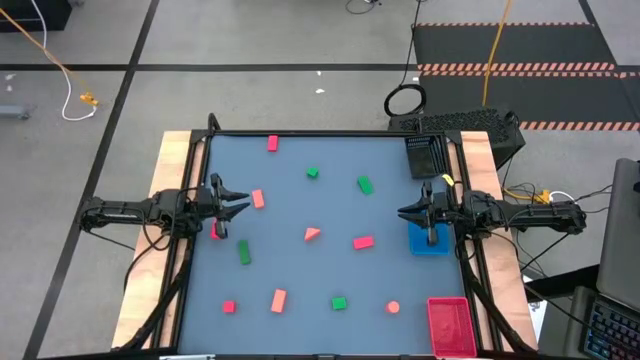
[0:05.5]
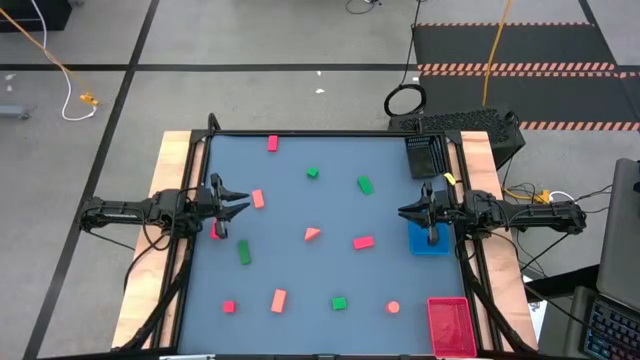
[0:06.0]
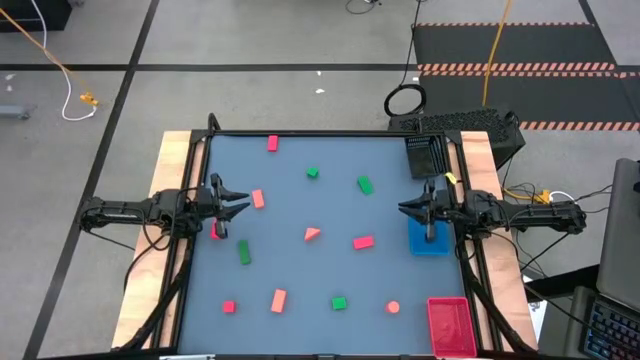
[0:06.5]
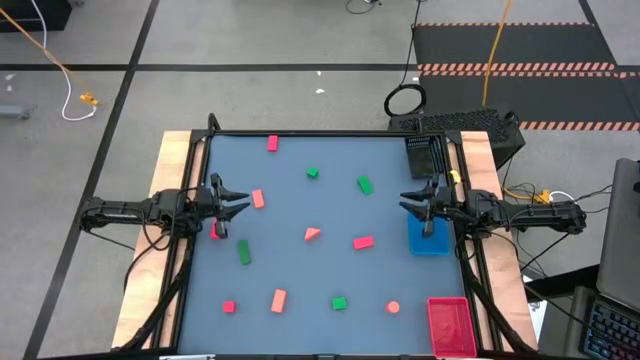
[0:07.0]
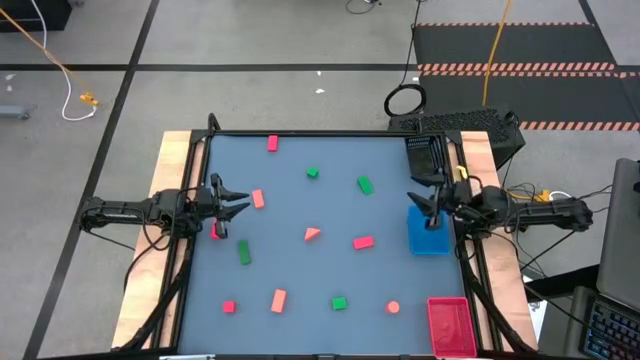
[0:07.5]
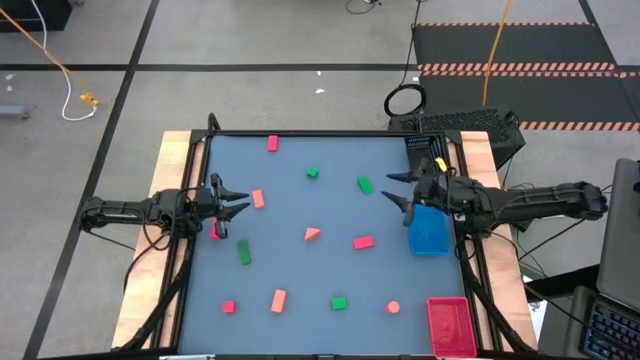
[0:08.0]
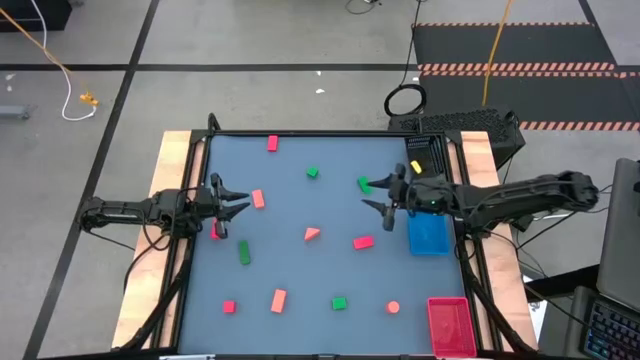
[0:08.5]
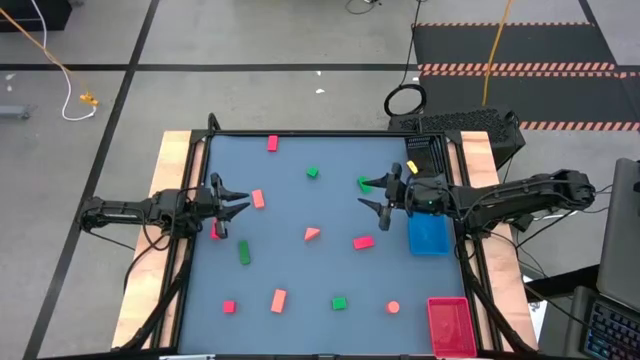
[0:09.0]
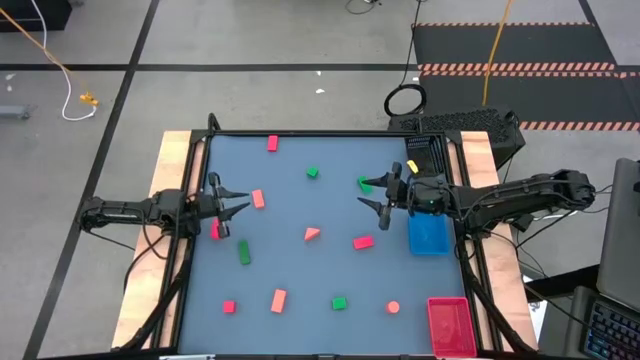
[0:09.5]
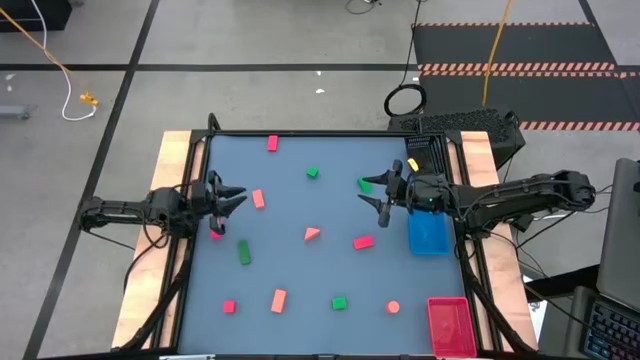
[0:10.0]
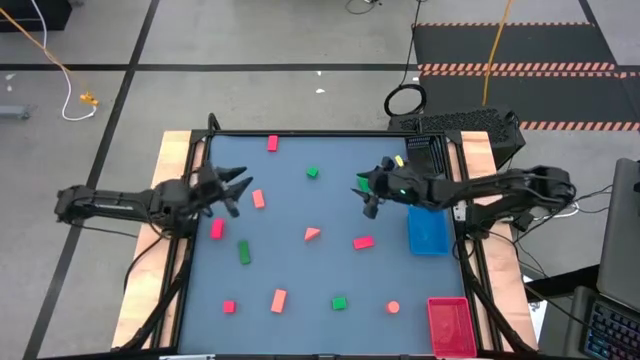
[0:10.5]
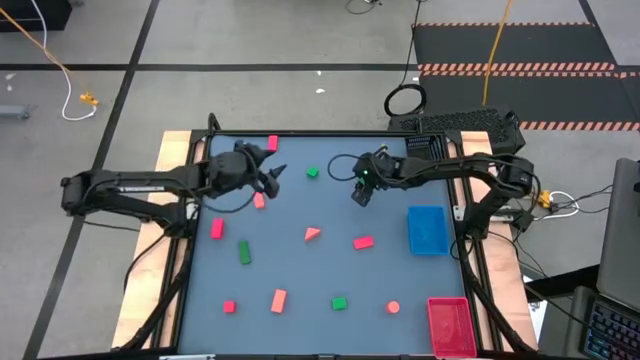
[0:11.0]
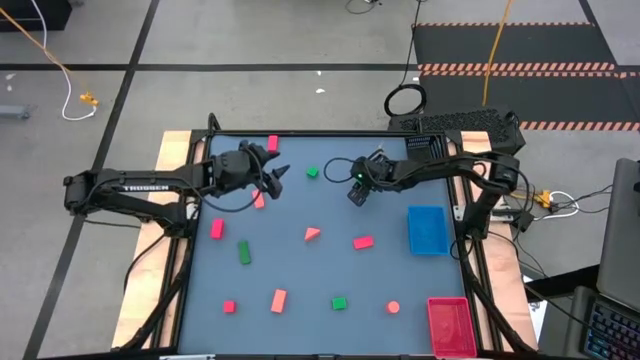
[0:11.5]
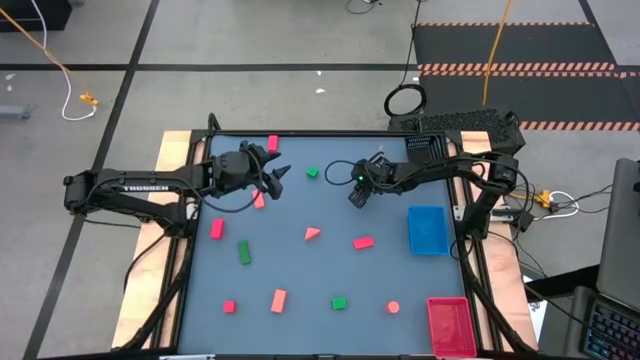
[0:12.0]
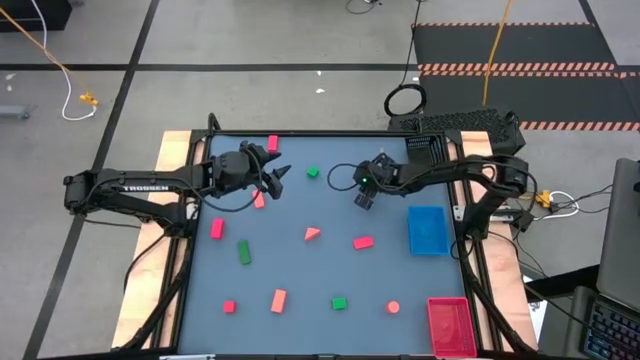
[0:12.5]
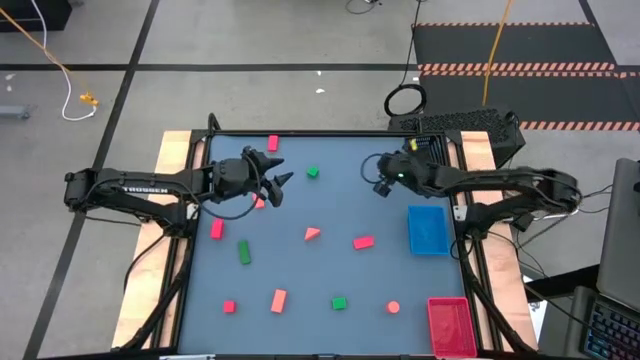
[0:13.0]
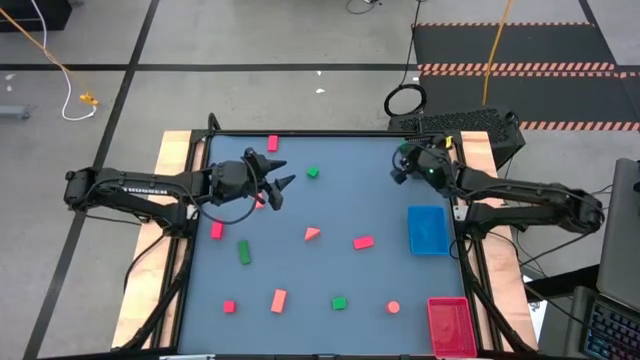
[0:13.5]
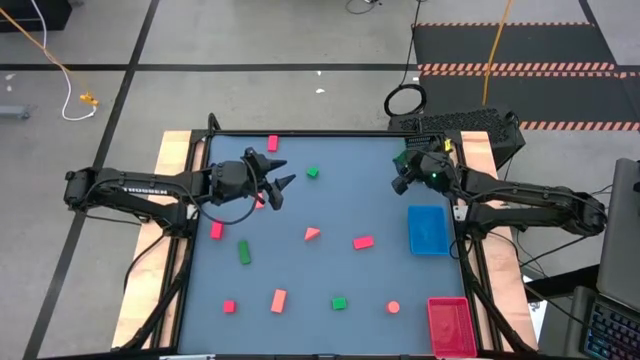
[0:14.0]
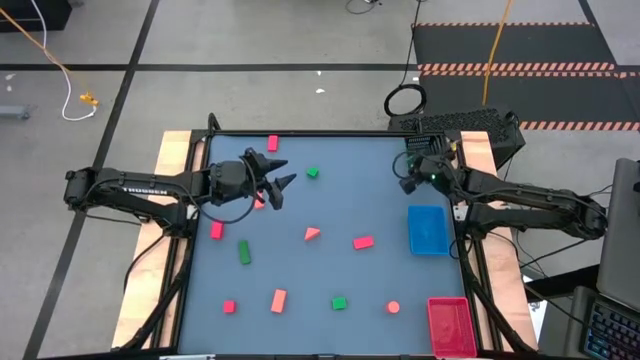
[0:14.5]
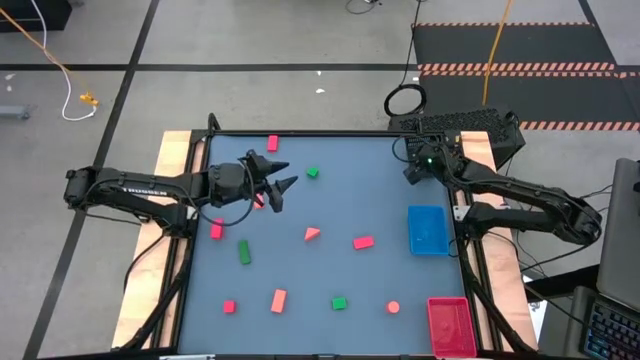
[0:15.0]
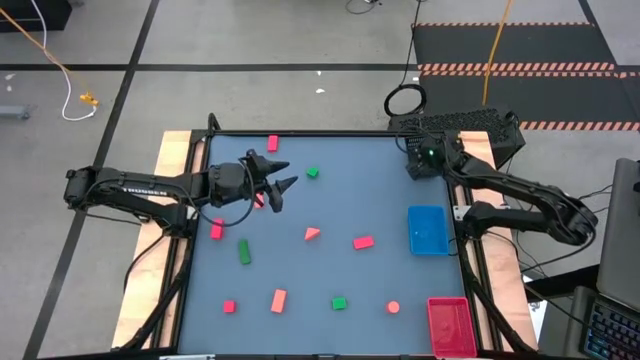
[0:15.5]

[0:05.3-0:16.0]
Task: Sort & place blocks by color
Put the green block into the black bin

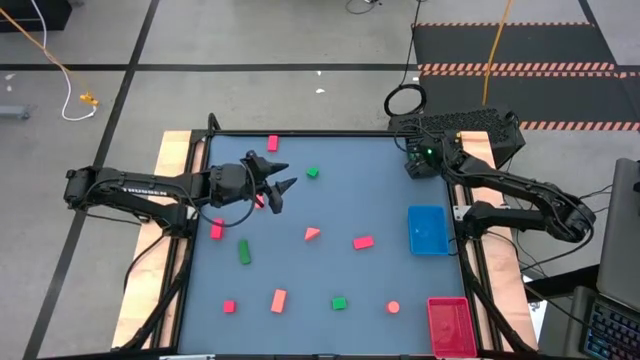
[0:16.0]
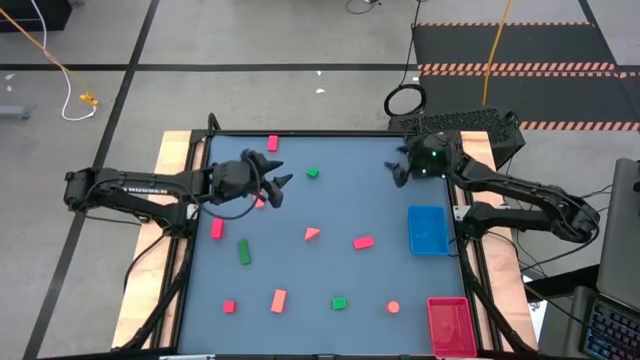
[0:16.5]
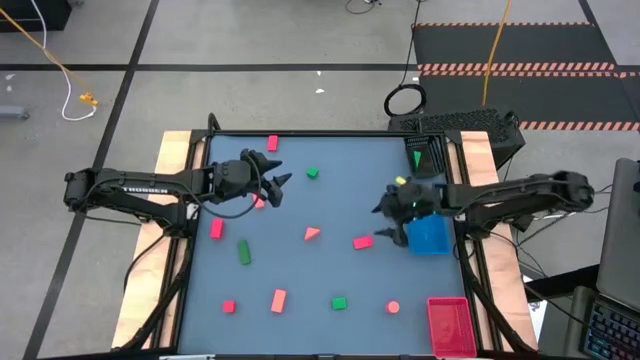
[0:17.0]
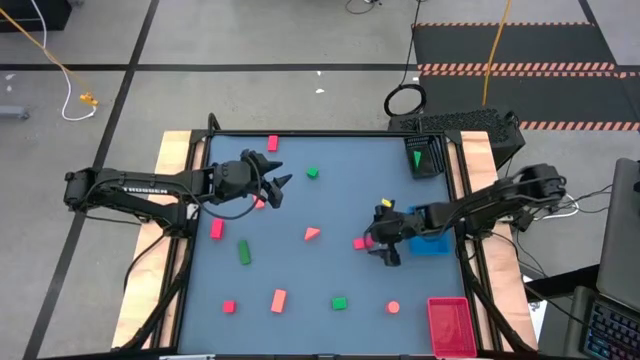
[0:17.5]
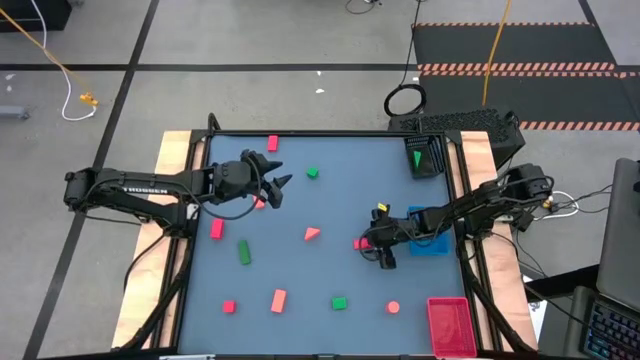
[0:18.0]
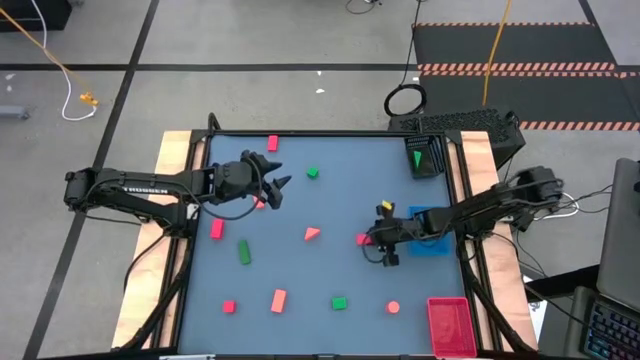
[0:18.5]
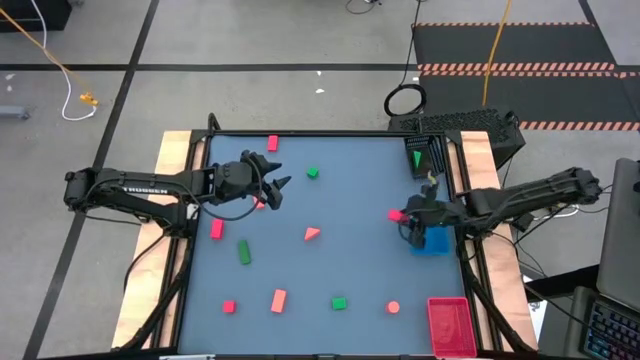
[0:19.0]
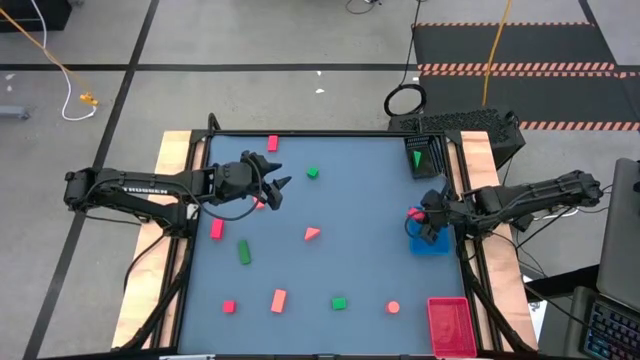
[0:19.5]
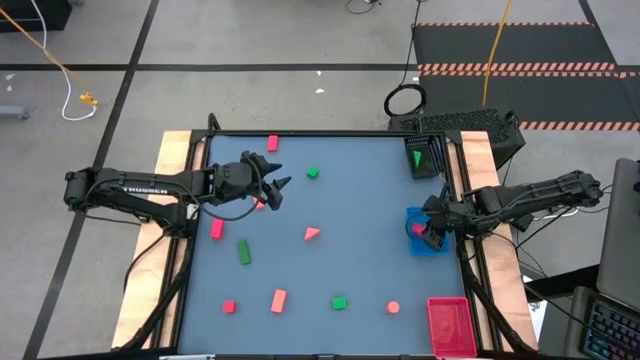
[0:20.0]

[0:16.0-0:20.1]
Put the red block into the blue bin

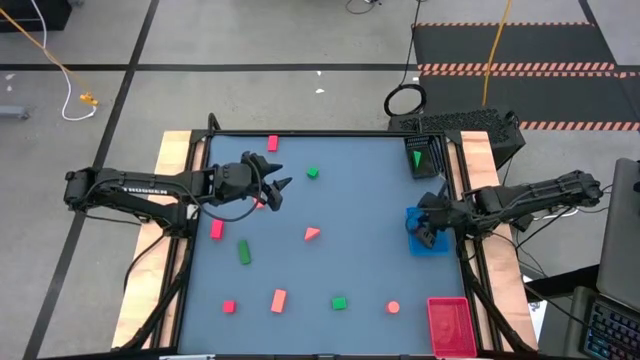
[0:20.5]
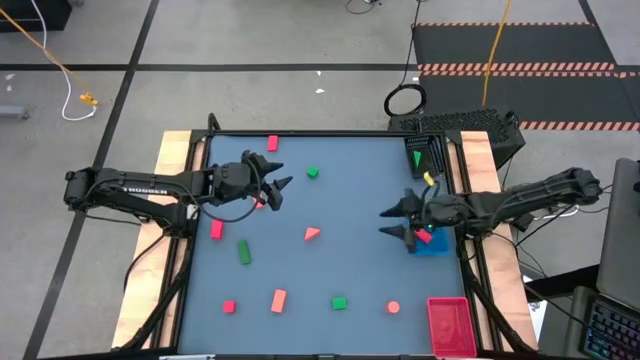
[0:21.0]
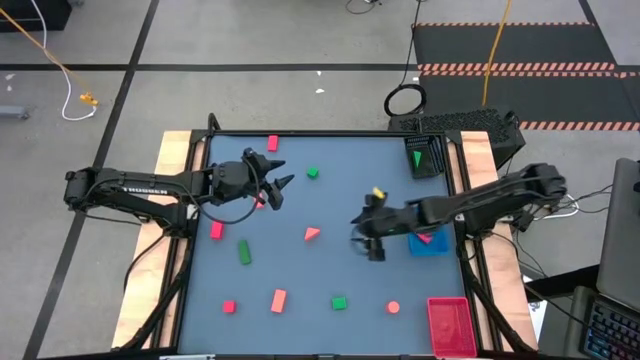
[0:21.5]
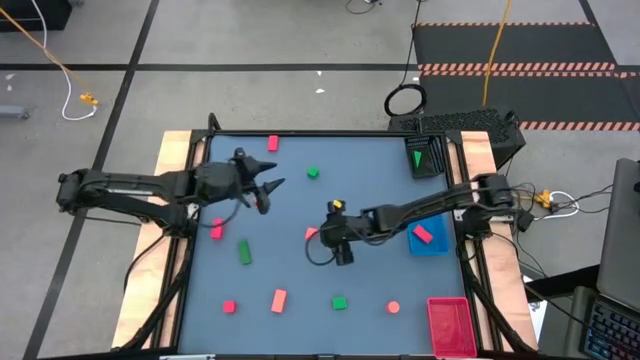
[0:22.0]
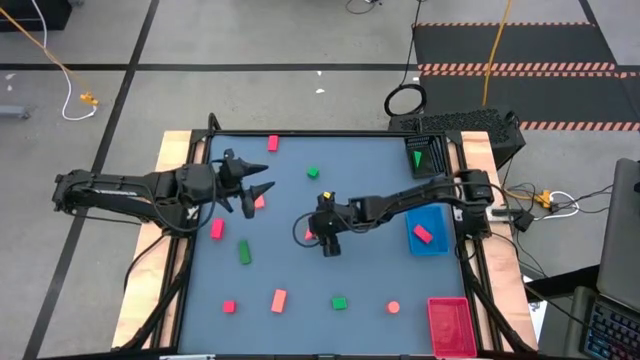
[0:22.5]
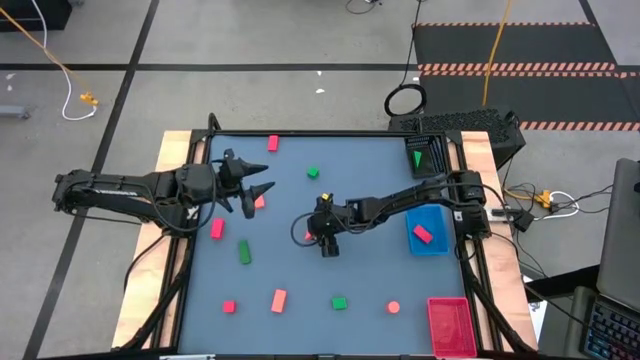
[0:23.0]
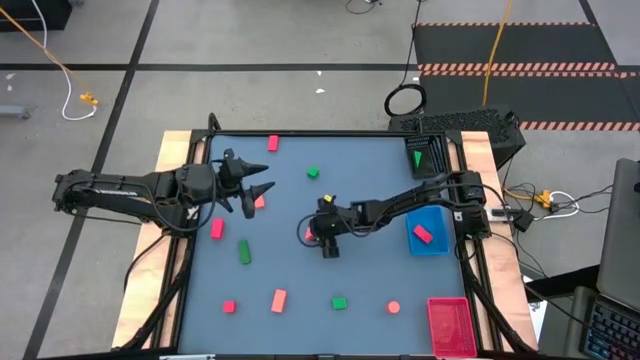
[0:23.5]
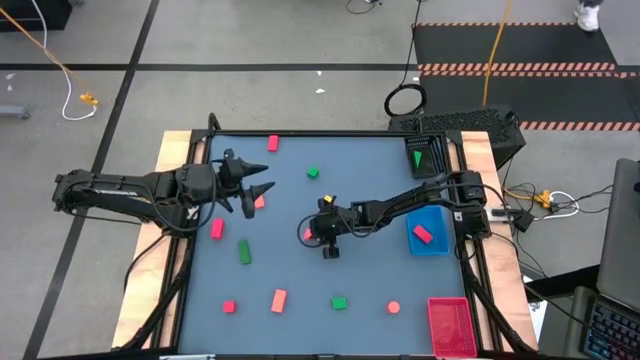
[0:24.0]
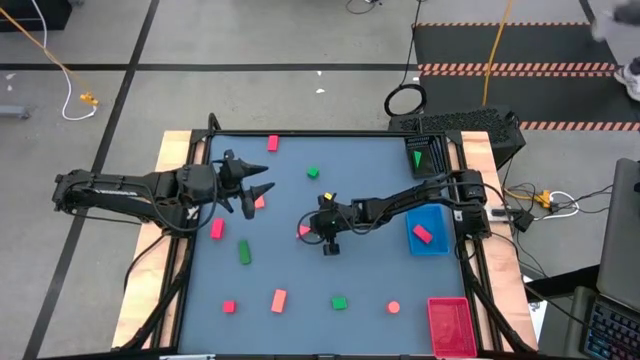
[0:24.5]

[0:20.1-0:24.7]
Put the orange block into the red bin

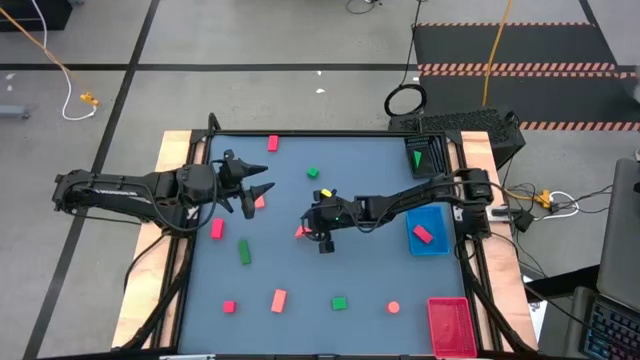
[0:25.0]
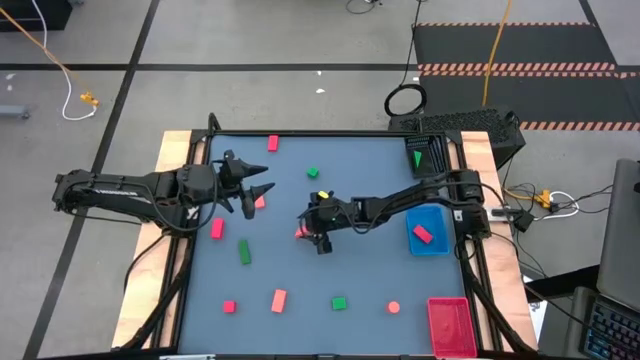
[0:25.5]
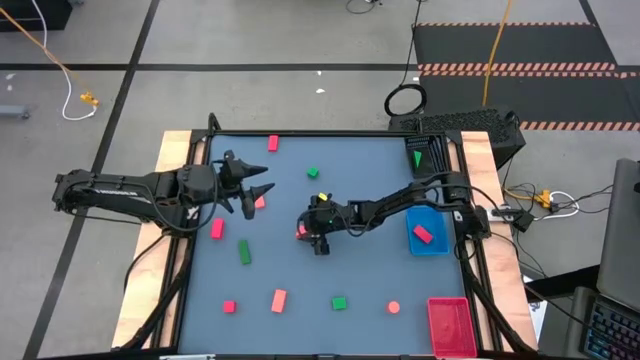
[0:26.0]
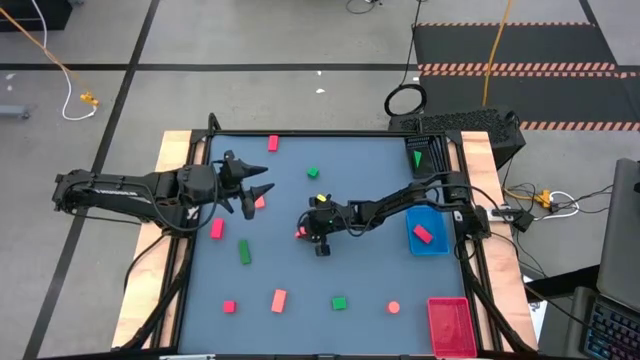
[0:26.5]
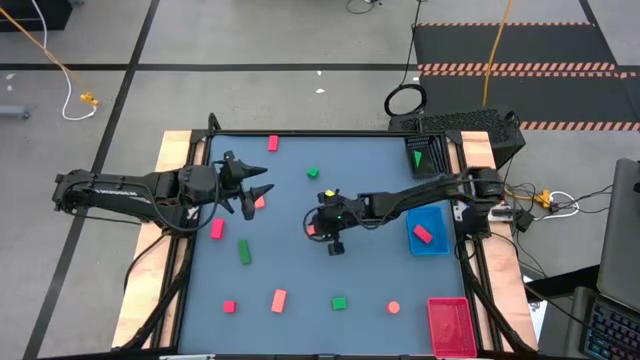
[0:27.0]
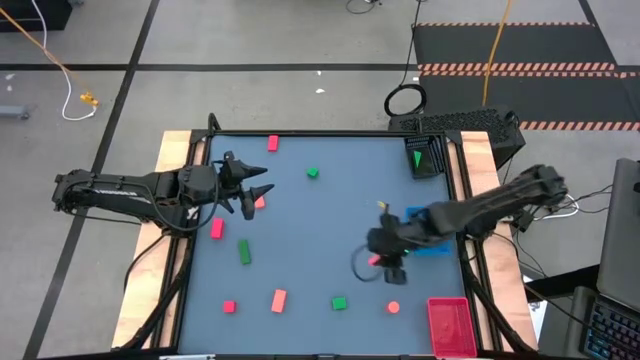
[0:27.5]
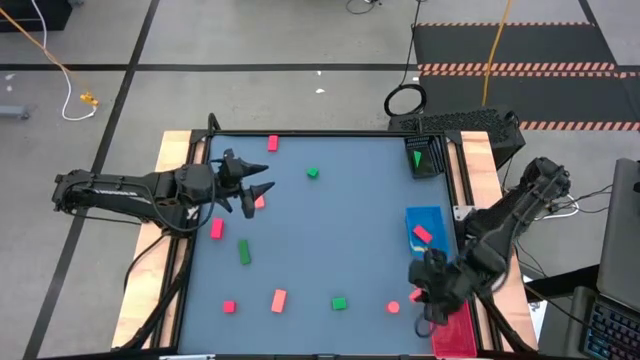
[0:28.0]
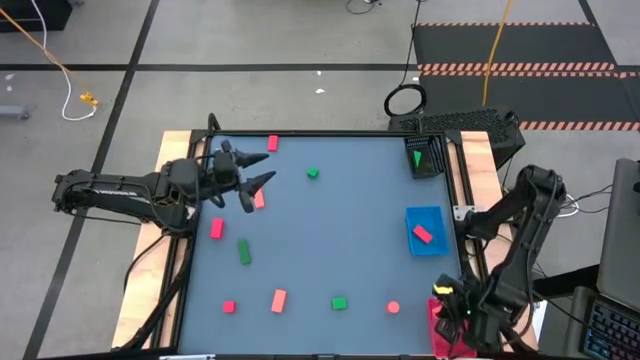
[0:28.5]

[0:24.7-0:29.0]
Put the orange block into the red bin
